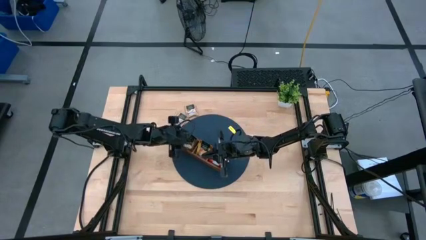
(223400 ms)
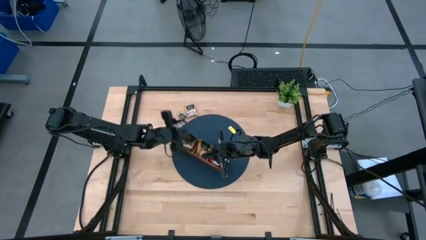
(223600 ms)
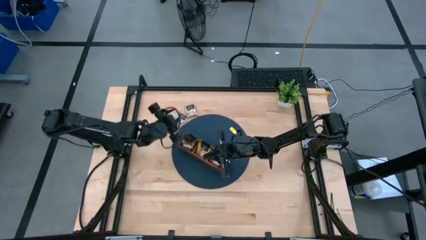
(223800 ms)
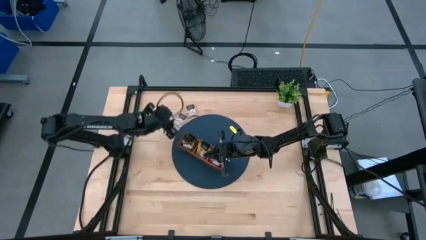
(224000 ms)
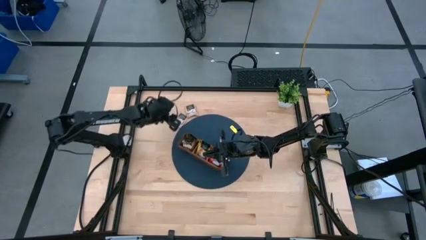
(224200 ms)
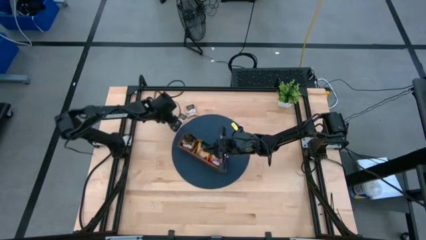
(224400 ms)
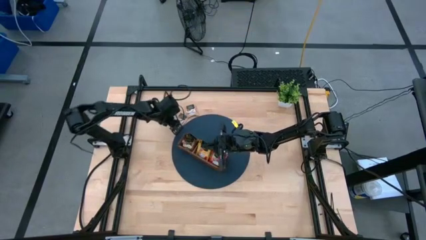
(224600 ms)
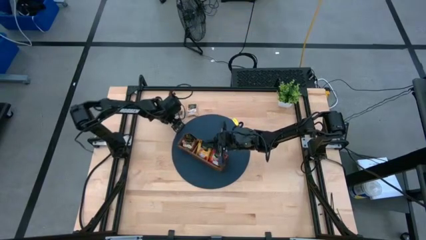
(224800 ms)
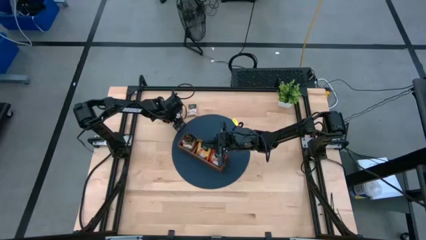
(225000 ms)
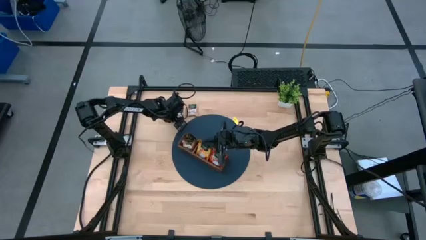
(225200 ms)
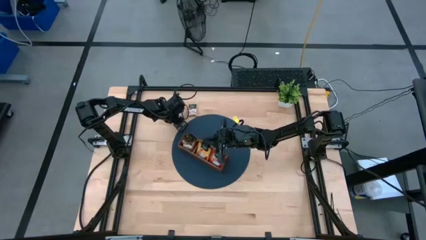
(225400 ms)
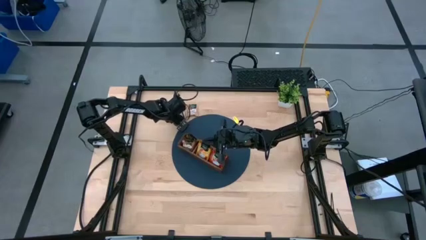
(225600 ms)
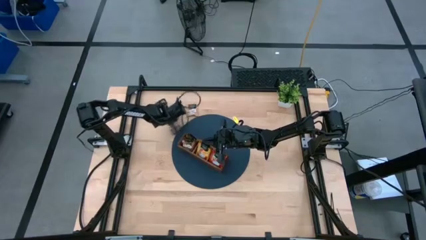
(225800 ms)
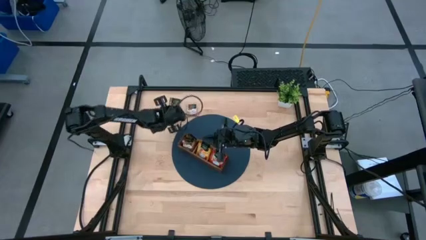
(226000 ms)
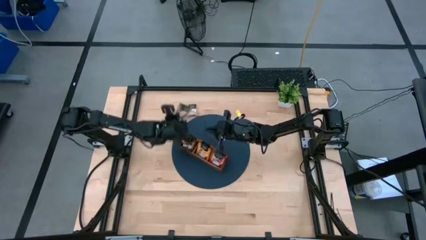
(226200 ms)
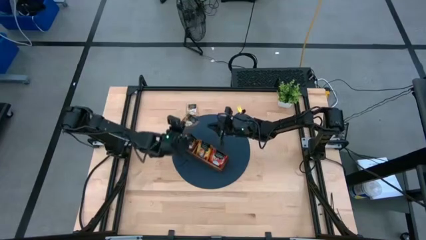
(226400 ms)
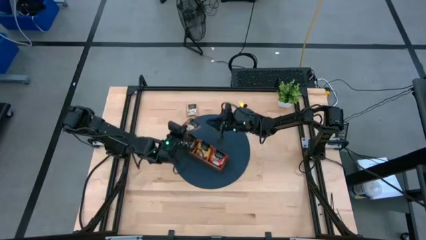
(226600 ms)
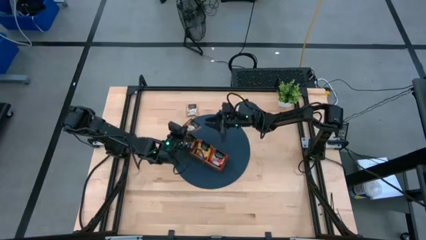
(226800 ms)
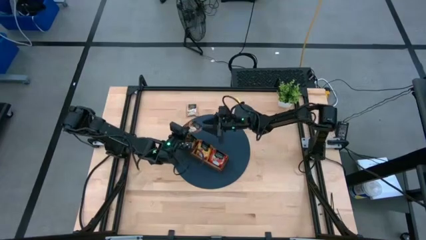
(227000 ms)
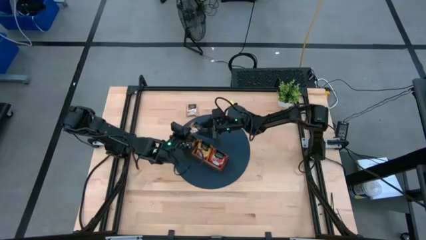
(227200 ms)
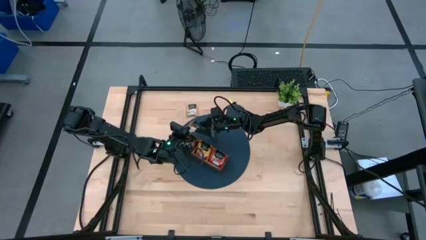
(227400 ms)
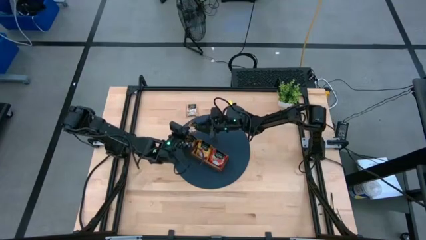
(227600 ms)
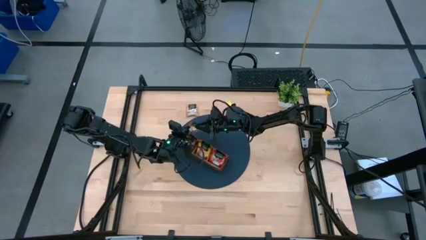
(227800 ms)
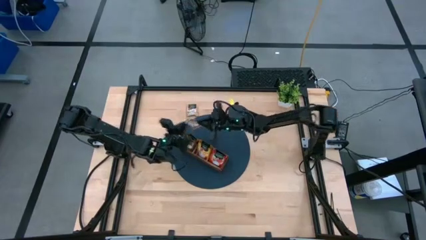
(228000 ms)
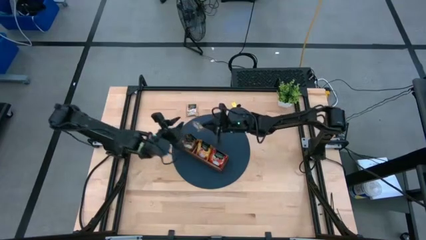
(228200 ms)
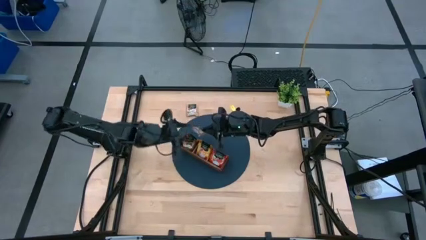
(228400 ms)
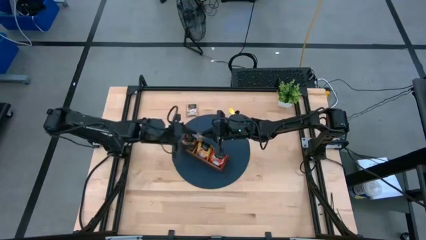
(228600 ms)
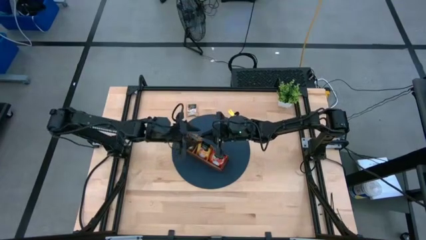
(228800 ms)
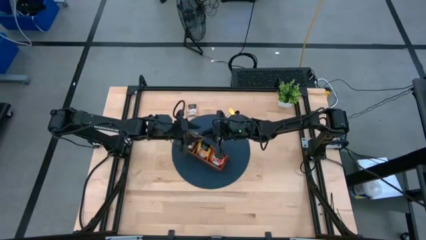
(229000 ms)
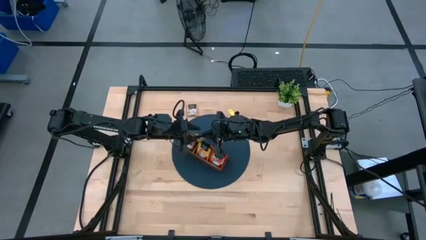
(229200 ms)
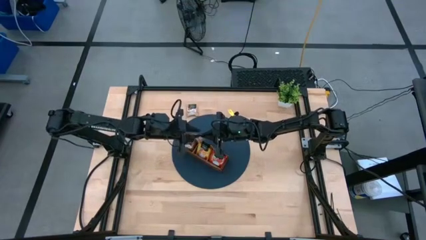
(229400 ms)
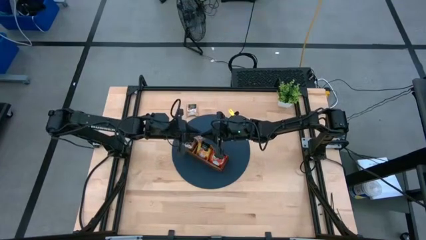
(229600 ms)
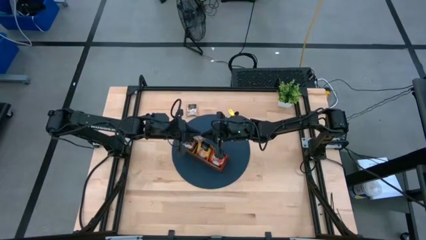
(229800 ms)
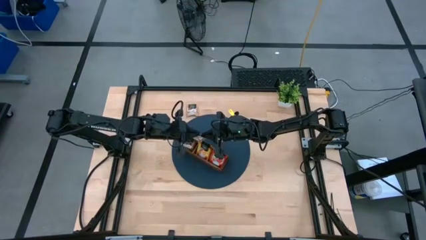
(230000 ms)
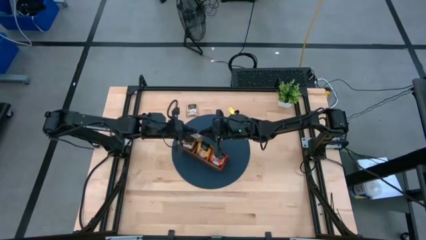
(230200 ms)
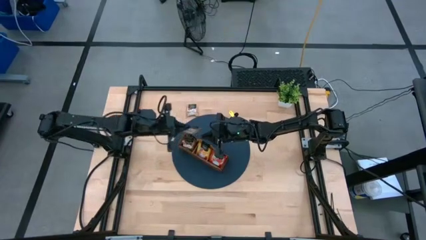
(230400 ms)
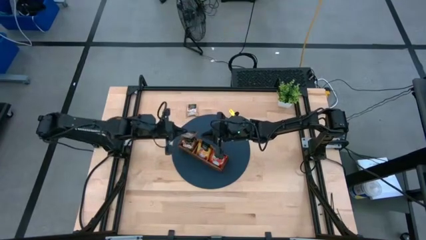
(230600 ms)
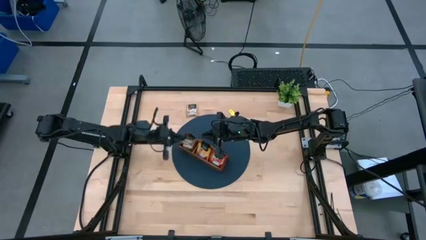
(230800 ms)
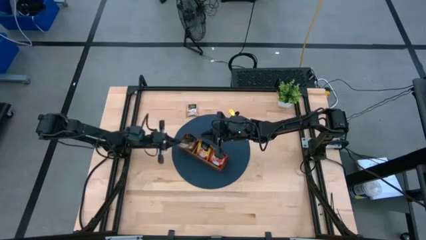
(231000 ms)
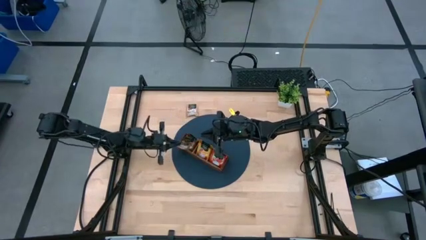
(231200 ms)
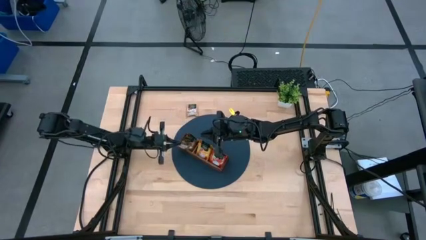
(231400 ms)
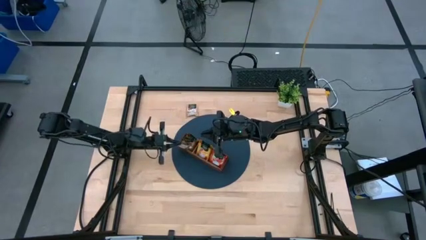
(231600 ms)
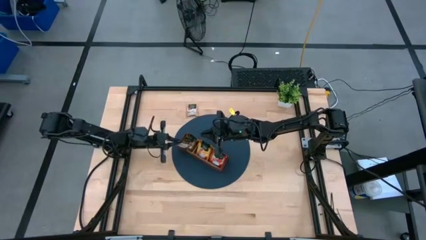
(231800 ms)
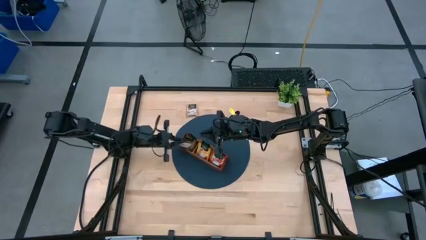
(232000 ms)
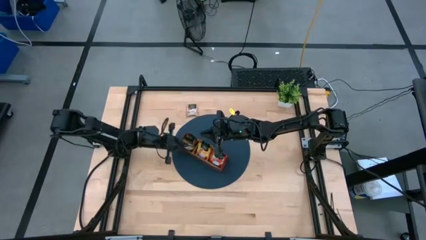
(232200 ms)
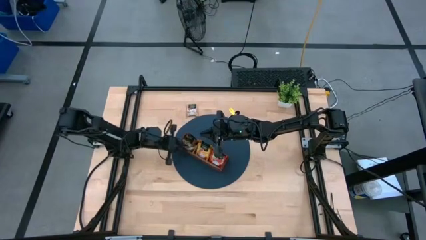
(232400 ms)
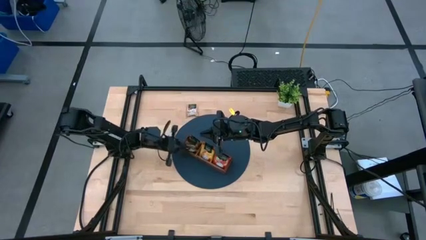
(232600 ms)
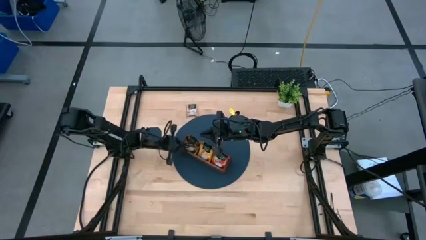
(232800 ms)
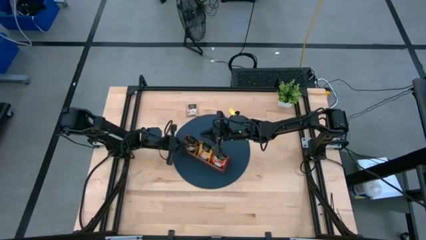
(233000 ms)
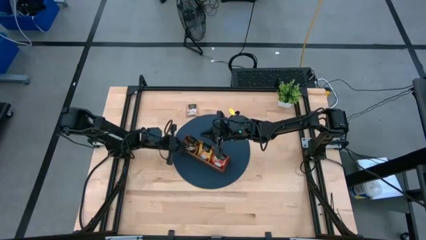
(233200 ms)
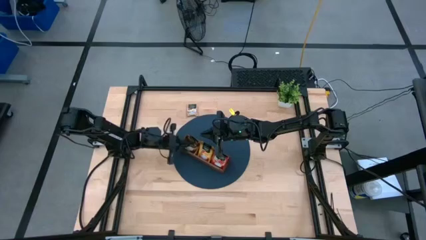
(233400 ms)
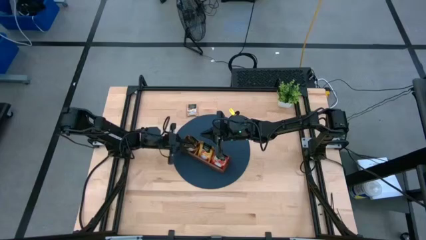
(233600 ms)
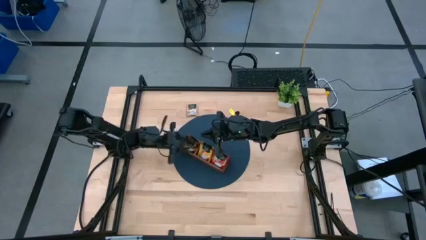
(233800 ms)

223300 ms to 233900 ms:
Task: Pick & Place Tea
Put the brown tea bag into the left section of the wooden organizer

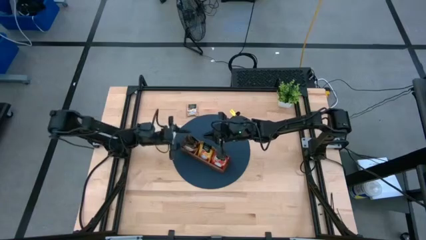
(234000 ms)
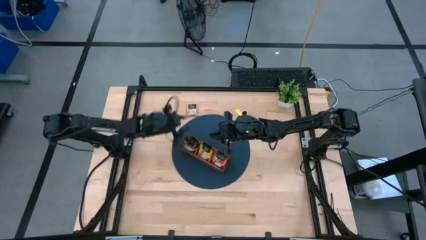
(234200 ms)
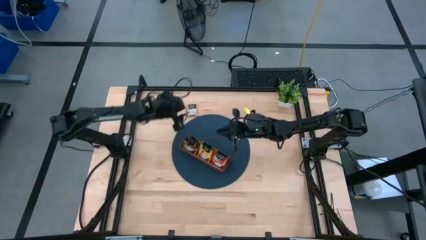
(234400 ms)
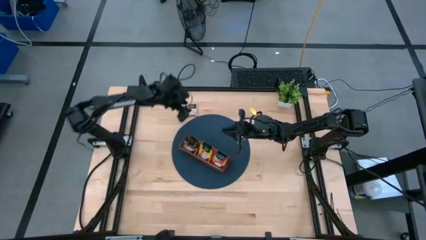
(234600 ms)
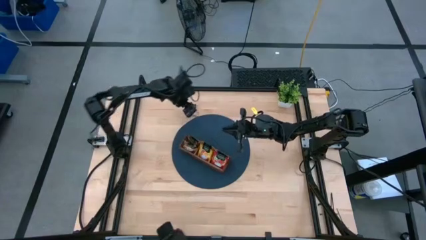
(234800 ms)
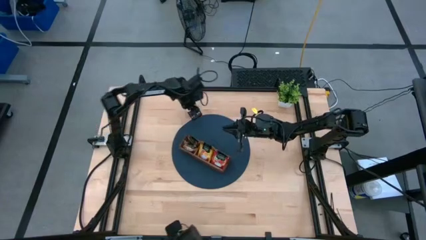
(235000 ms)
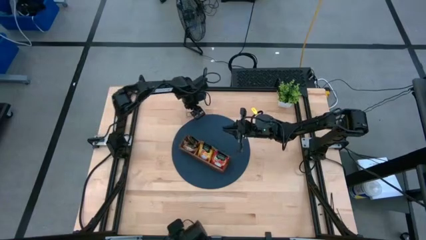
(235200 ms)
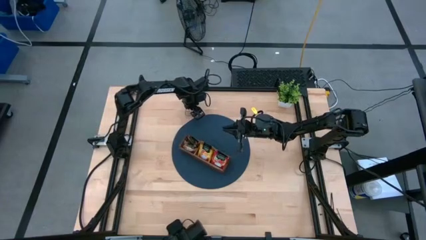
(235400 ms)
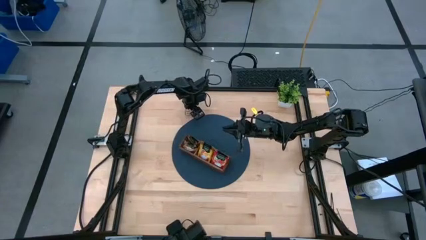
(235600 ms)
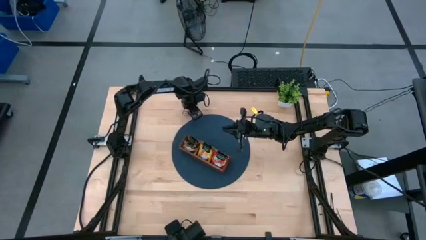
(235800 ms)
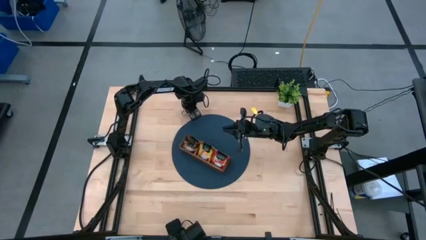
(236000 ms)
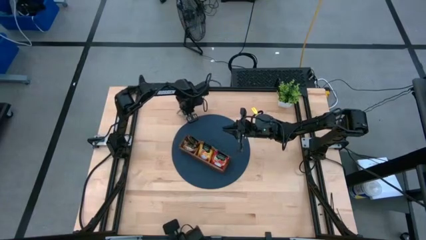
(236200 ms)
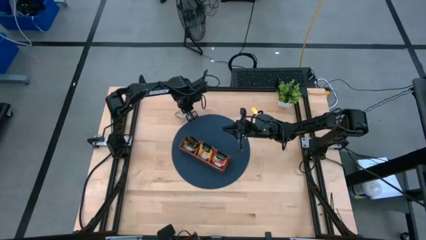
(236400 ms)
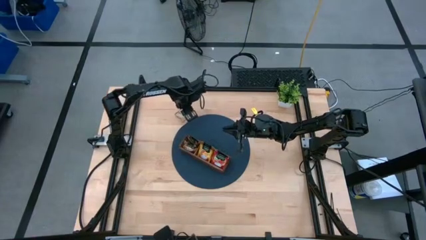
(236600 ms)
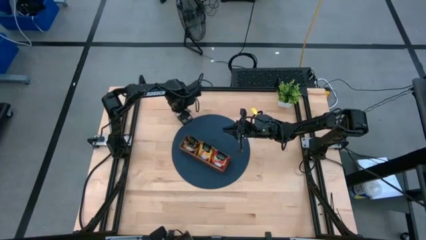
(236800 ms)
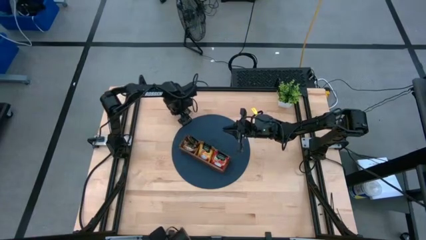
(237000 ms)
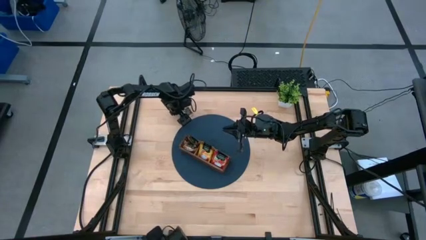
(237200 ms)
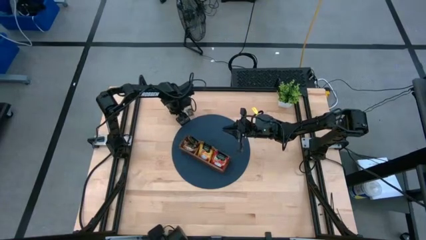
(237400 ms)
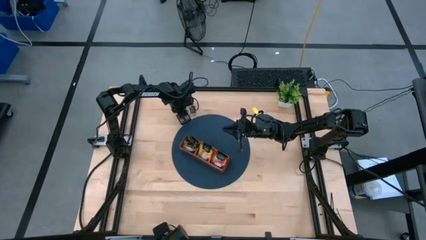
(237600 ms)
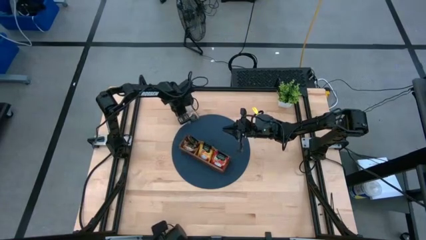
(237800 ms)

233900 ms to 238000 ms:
Put the brown tea bag into the left section of the wooden organizer
